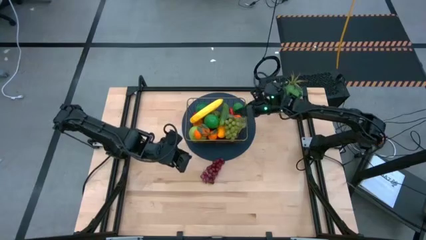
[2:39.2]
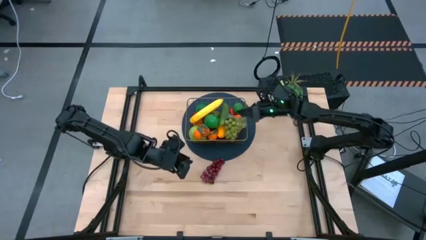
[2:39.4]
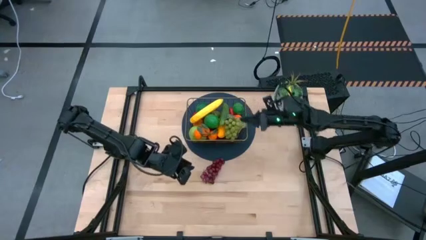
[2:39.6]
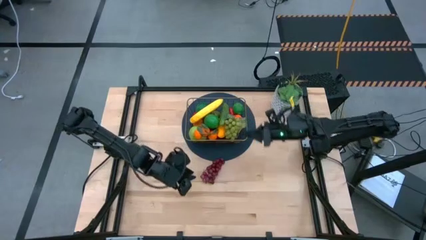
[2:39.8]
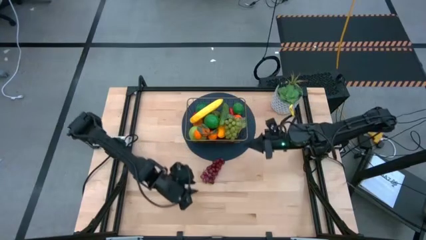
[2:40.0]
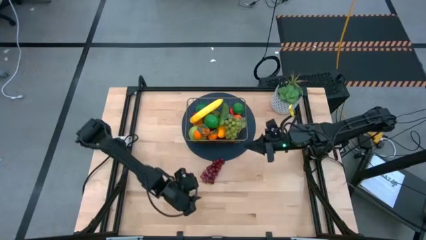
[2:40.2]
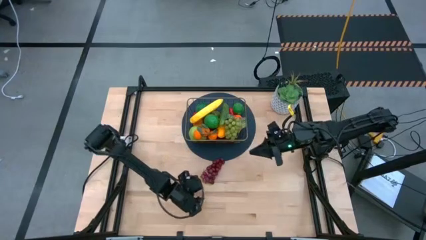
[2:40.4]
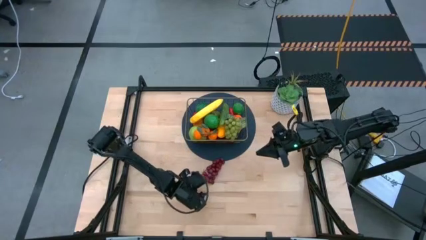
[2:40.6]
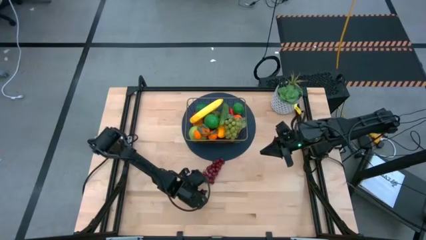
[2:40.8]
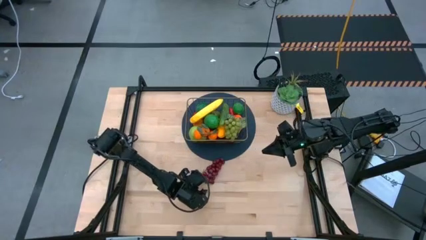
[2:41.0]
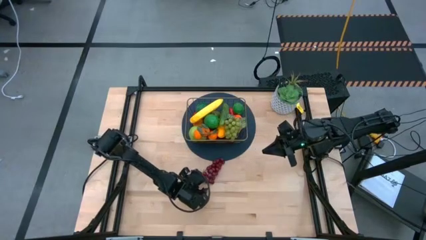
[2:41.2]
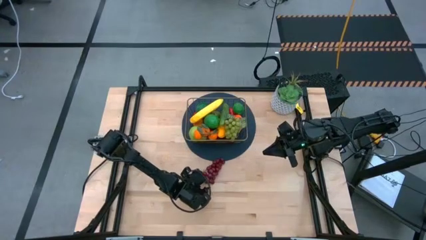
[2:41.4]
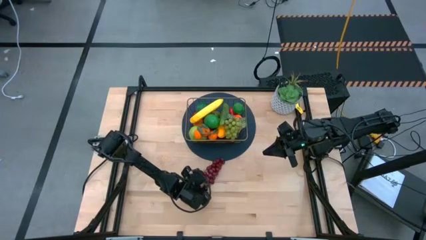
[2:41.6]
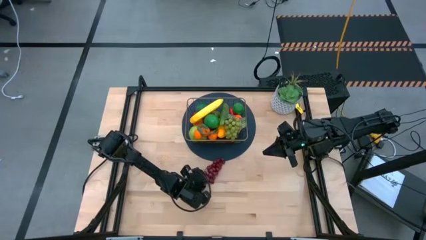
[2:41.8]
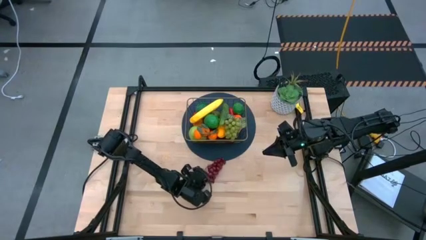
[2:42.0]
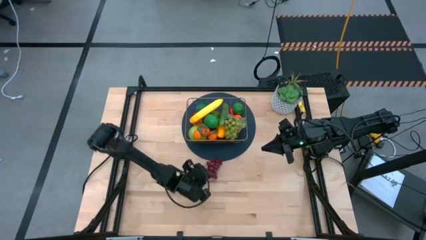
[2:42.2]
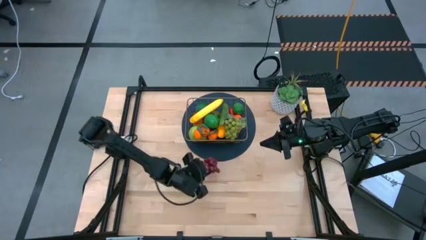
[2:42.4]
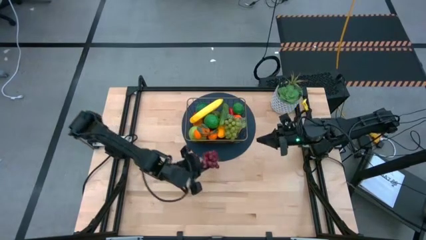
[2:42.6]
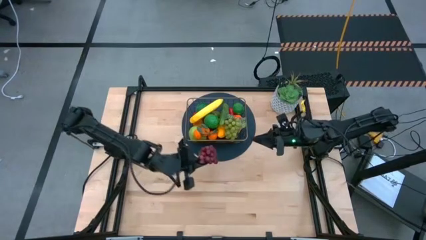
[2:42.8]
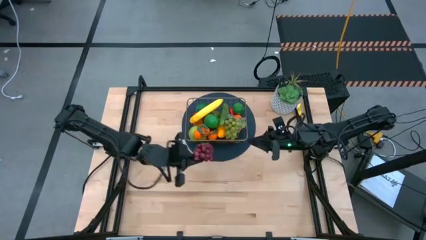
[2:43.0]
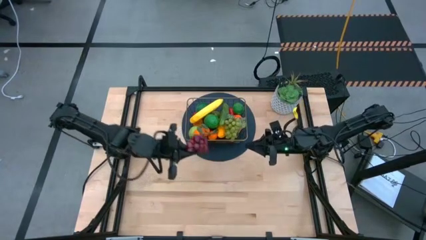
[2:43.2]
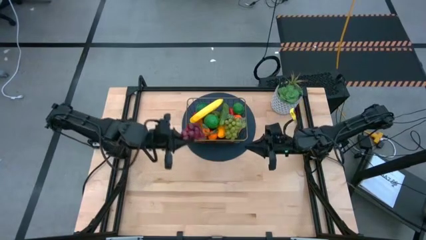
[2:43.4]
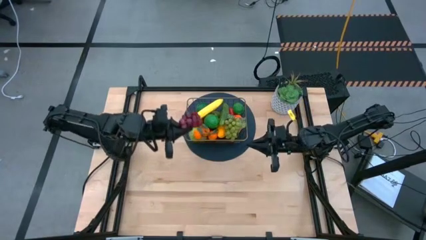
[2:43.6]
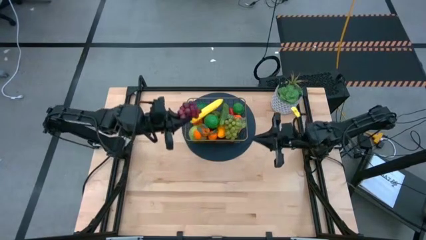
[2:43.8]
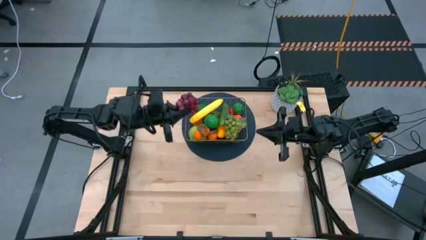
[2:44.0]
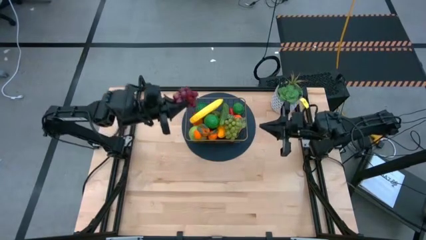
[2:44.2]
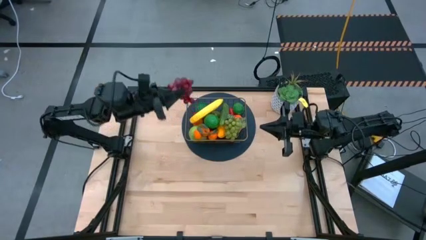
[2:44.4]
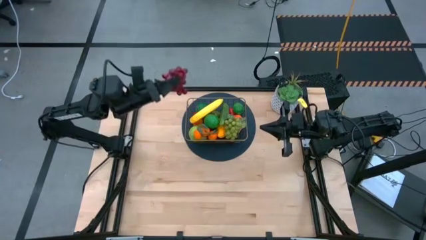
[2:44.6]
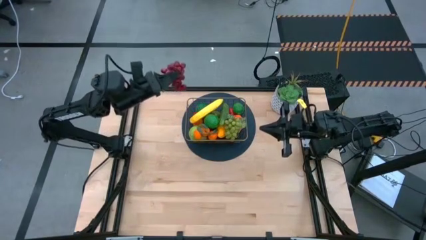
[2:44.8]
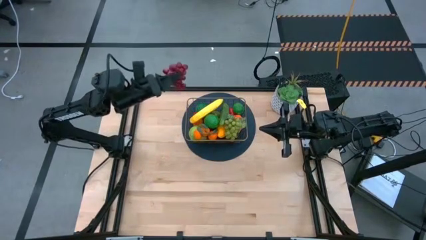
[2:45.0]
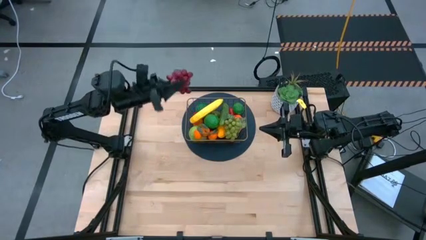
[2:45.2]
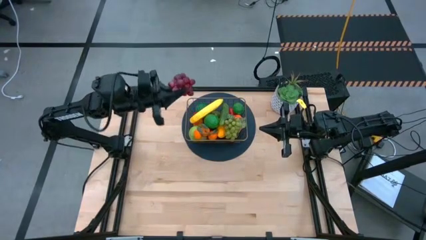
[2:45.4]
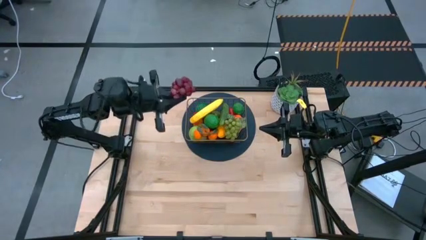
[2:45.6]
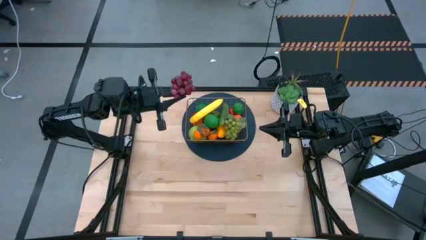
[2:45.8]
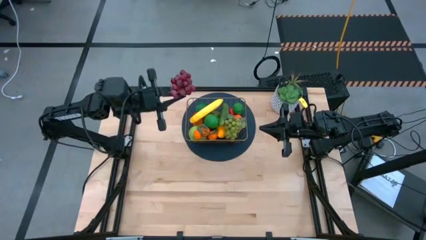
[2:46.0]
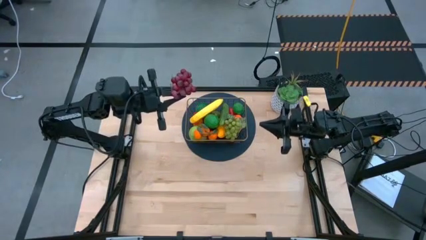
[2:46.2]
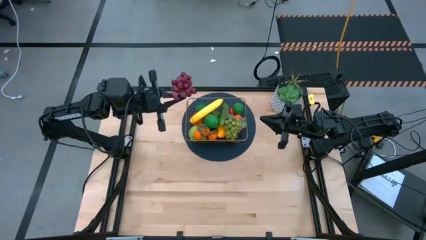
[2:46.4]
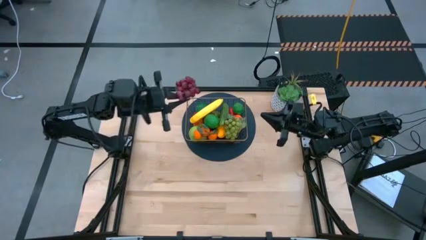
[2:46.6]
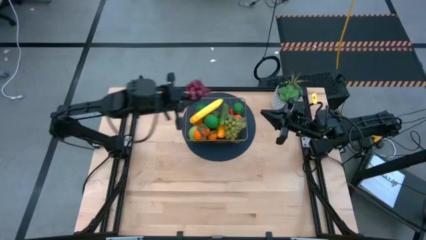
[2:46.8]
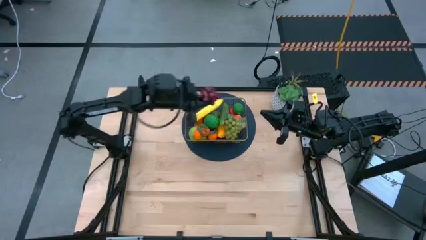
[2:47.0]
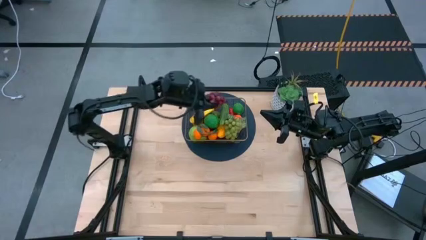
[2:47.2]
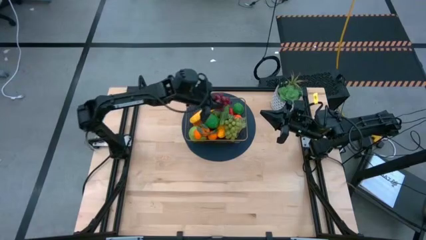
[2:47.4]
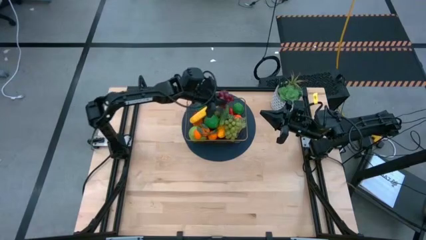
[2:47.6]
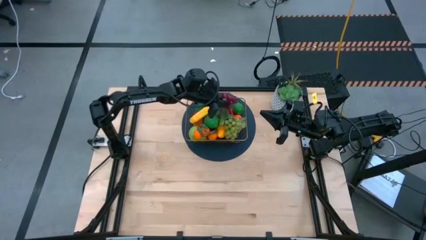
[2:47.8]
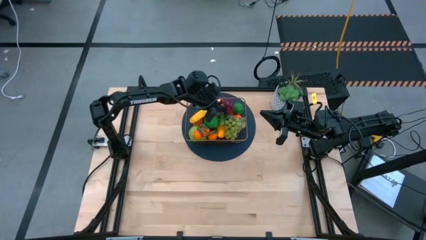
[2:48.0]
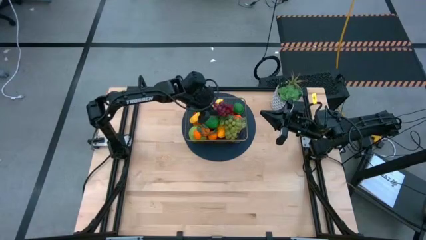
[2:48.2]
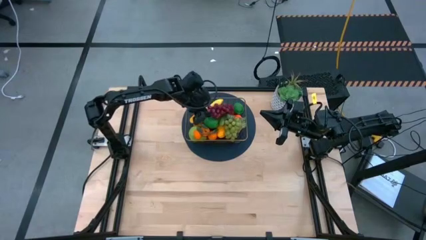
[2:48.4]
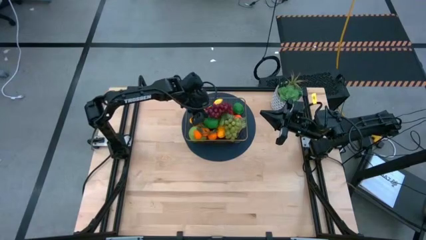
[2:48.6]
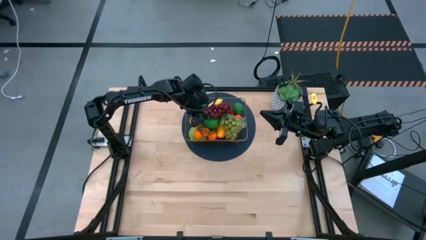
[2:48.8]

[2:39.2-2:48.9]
Task: Build produce basket
Put the red grapes into the wire basket

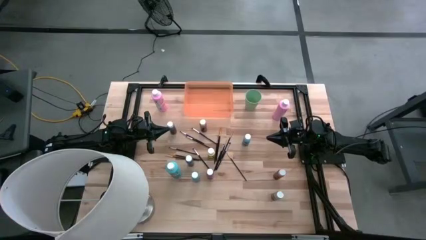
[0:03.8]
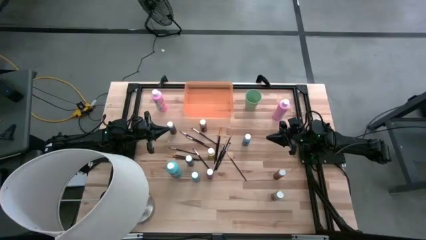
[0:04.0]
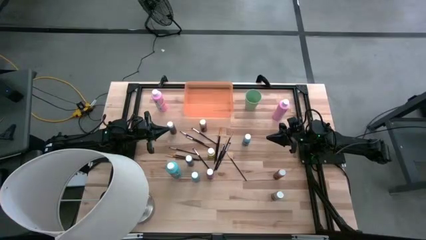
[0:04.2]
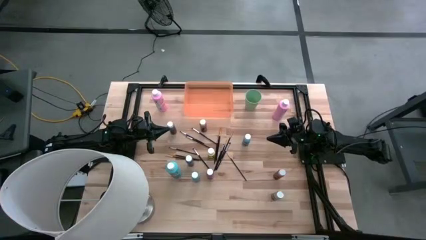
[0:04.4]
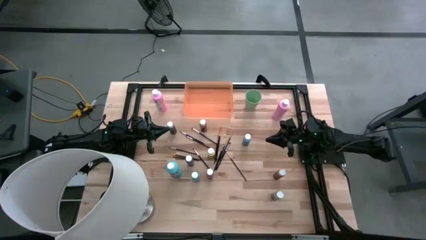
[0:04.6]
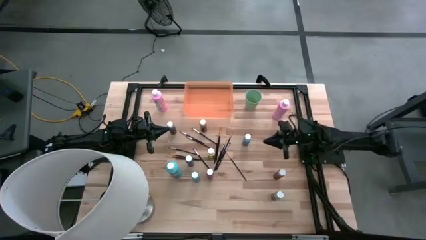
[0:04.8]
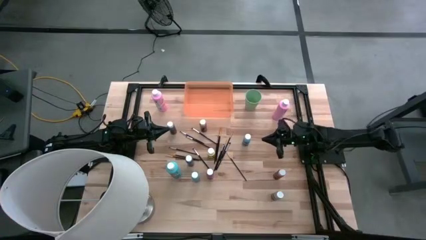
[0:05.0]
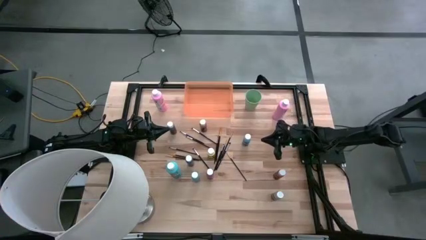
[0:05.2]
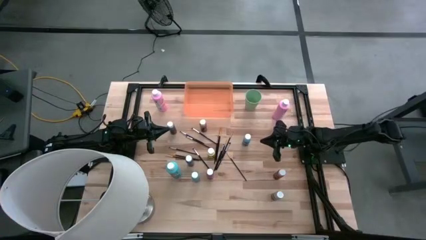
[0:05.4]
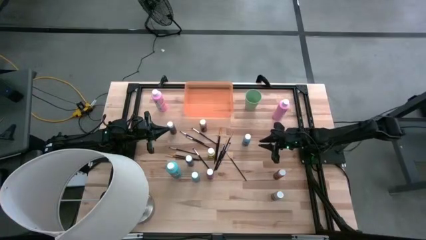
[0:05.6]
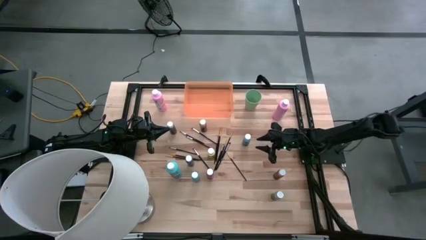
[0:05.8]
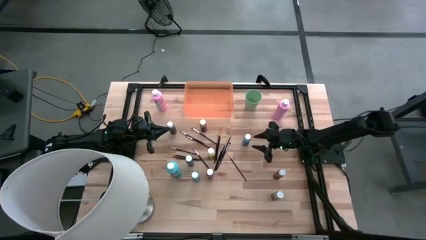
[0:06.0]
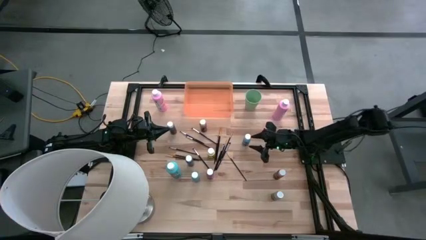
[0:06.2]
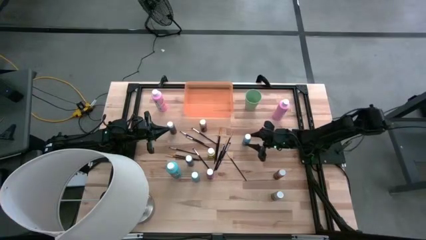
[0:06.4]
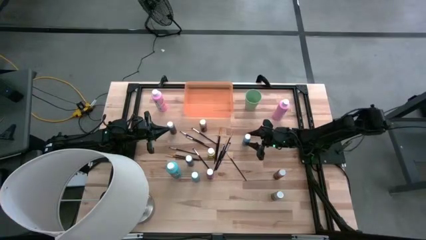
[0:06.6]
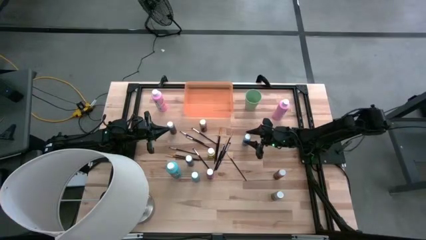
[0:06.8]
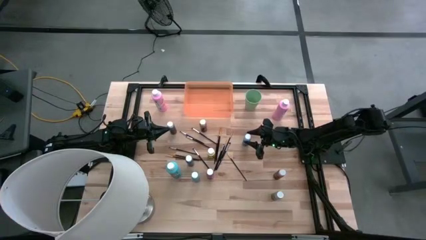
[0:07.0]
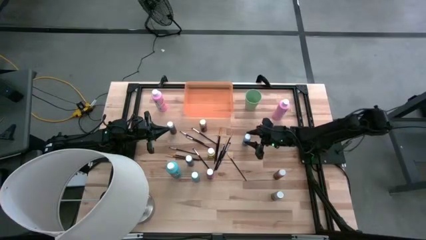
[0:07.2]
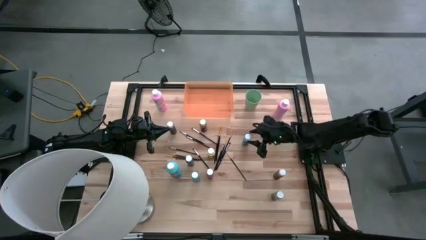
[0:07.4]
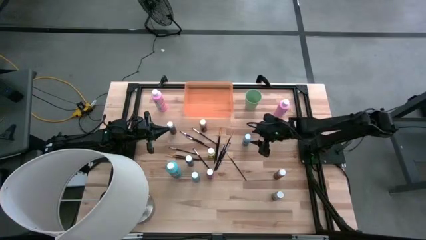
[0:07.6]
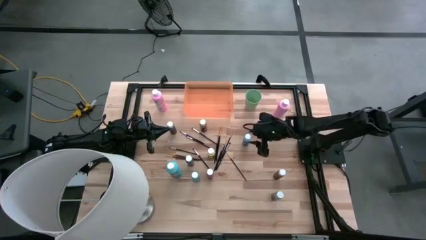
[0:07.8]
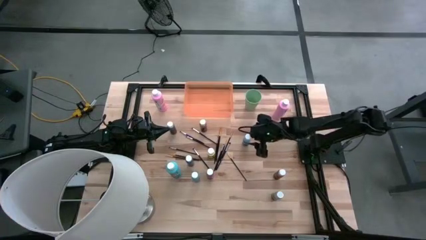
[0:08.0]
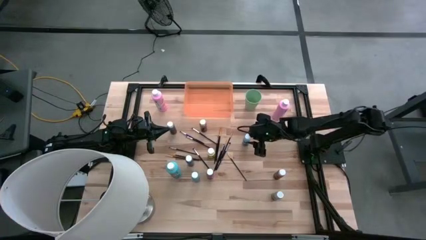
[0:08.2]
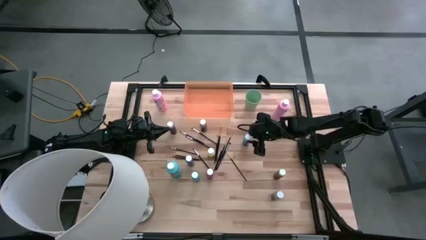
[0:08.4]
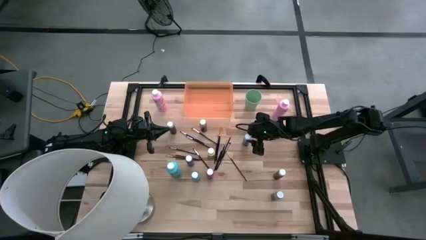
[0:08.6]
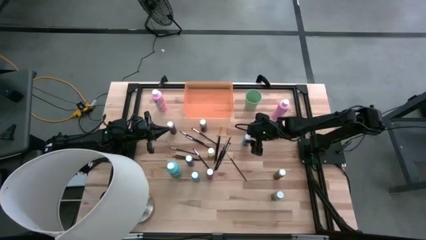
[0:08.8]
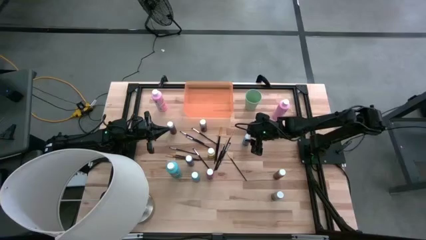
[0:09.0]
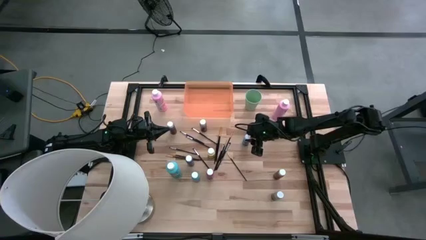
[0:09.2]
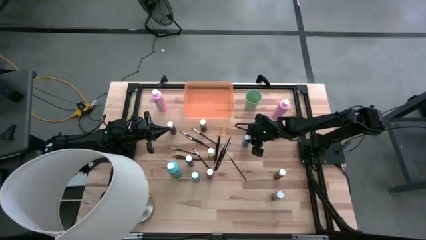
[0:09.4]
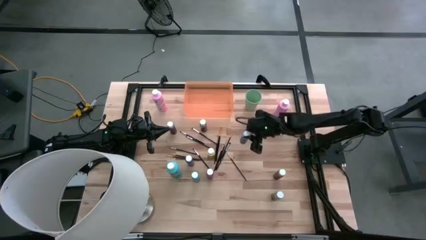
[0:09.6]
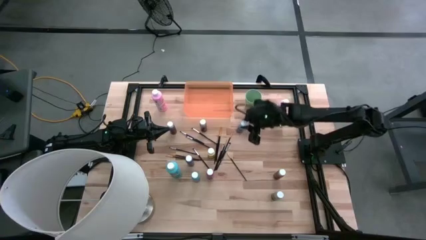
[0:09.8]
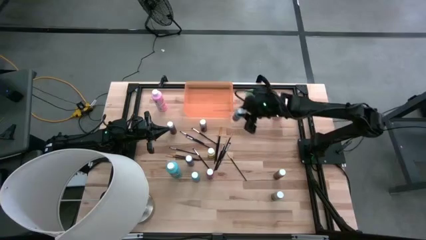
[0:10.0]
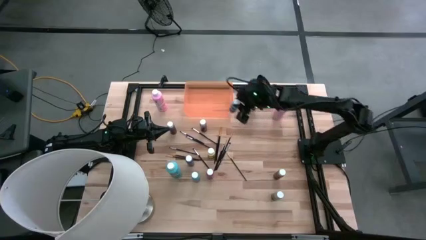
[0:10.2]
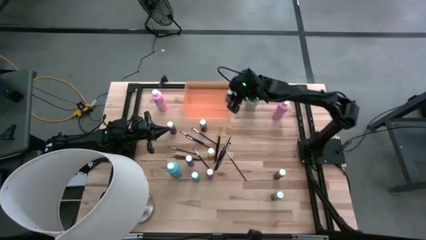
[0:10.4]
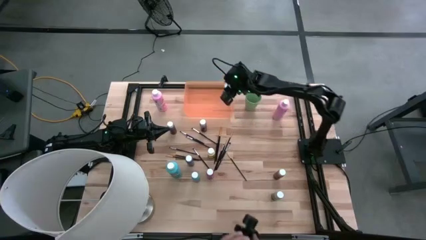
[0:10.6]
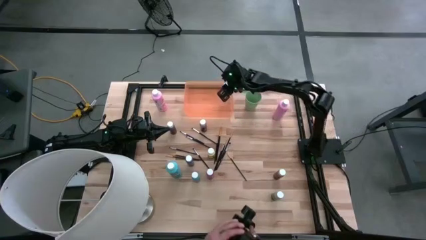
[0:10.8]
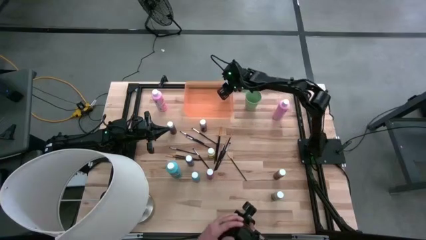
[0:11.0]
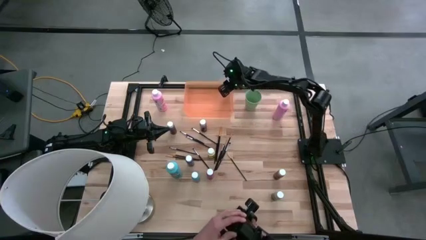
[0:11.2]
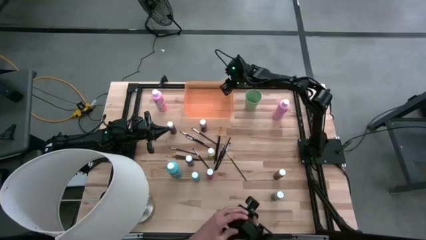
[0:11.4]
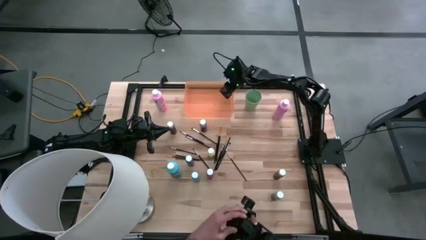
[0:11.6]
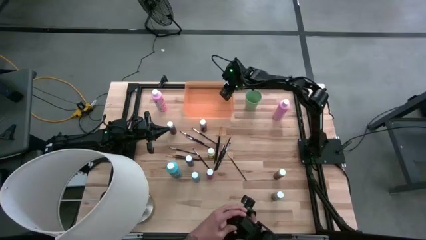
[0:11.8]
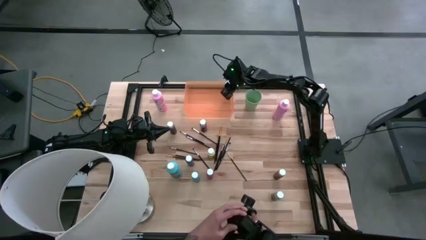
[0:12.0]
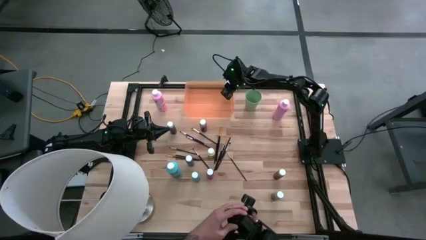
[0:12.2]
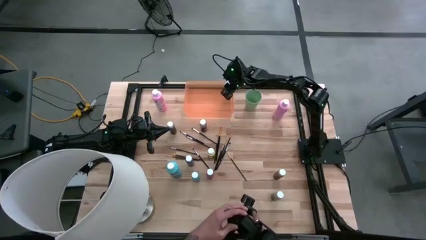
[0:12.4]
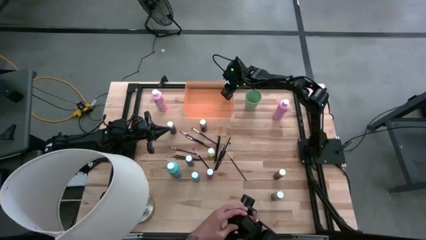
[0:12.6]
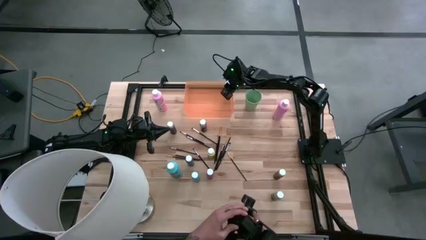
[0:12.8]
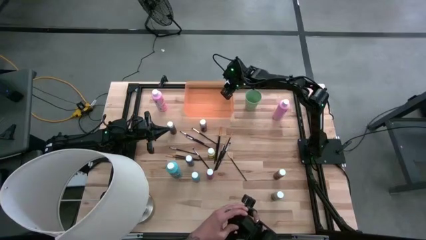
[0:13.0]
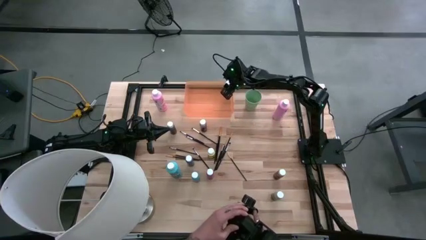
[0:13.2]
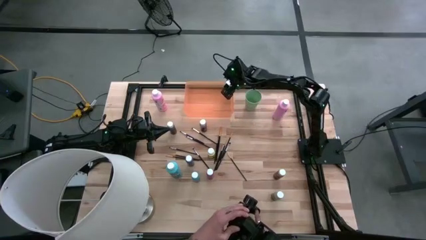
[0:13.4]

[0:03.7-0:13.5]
Task: Pick & Place Paint Supplies
Put the small blue paint bottle into the orange bin
